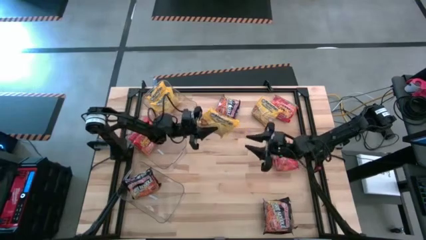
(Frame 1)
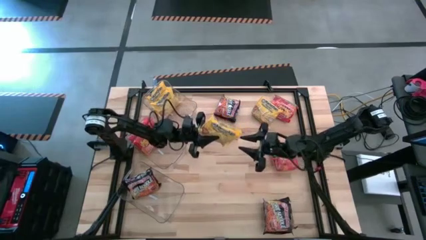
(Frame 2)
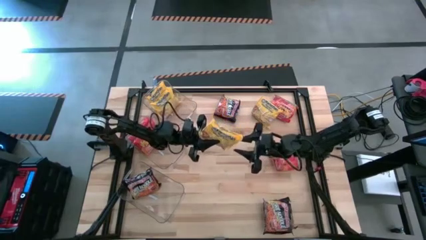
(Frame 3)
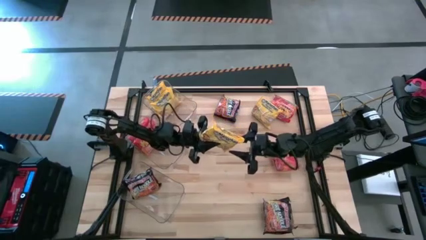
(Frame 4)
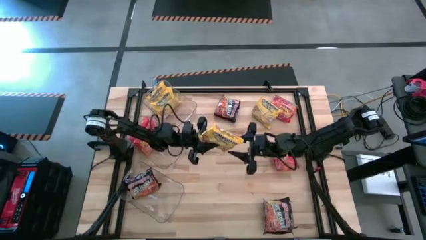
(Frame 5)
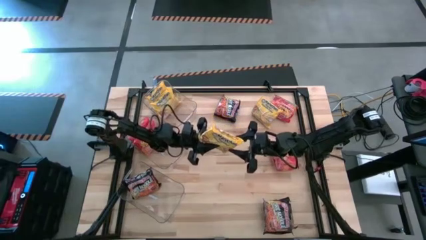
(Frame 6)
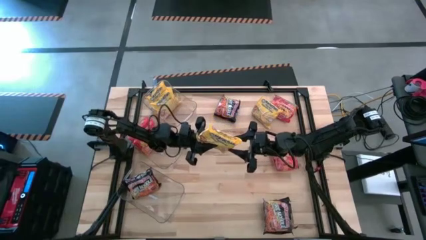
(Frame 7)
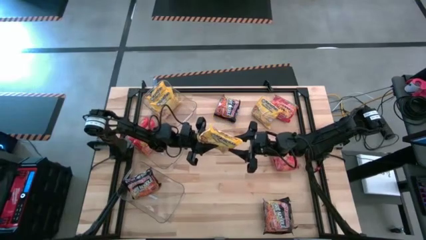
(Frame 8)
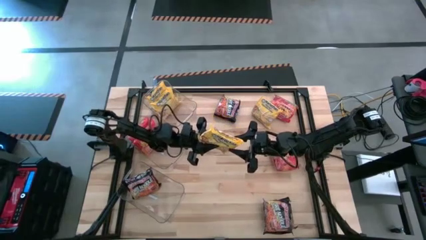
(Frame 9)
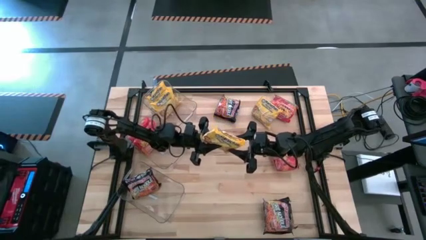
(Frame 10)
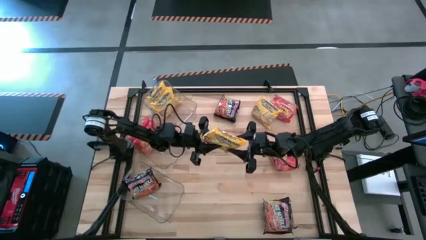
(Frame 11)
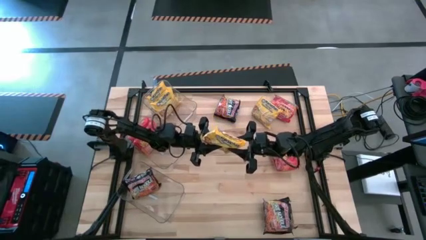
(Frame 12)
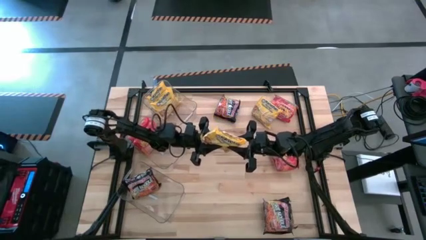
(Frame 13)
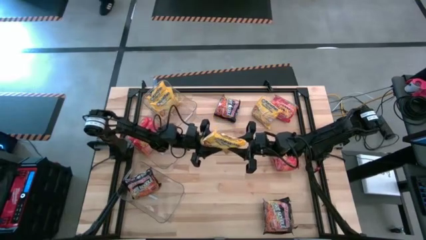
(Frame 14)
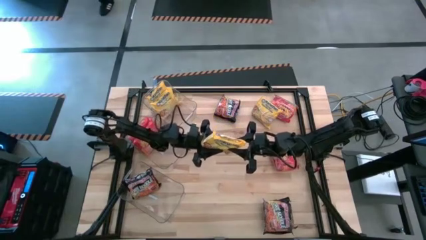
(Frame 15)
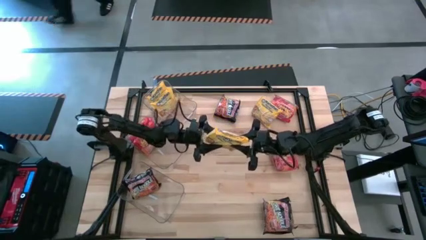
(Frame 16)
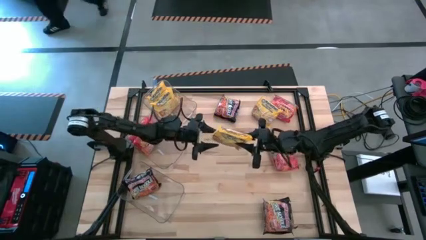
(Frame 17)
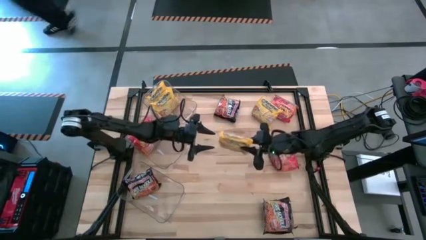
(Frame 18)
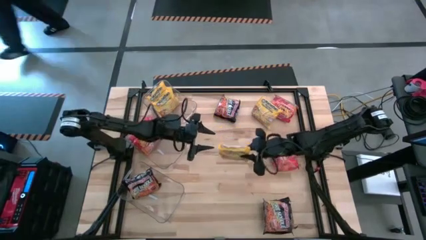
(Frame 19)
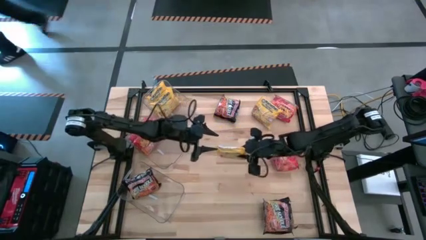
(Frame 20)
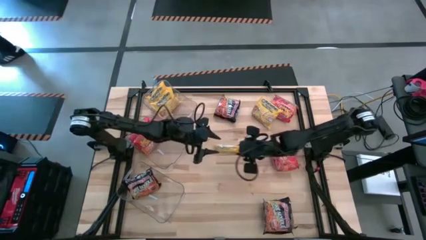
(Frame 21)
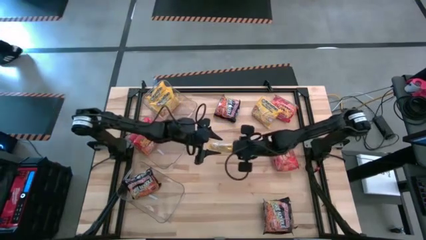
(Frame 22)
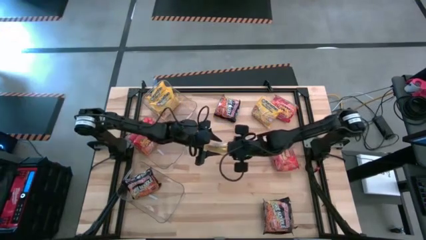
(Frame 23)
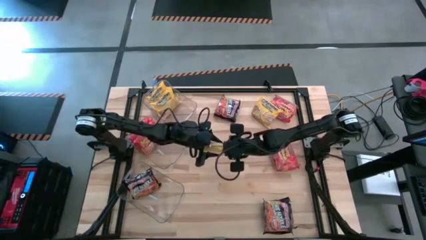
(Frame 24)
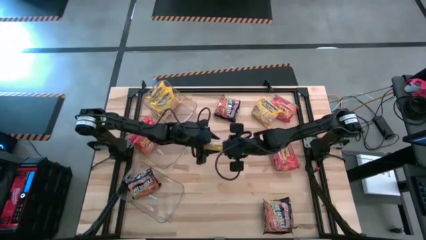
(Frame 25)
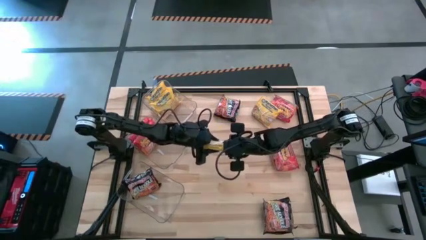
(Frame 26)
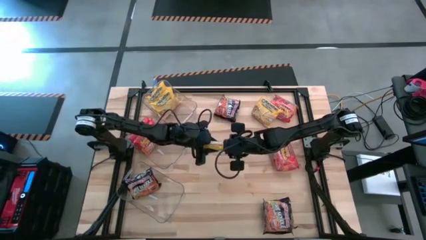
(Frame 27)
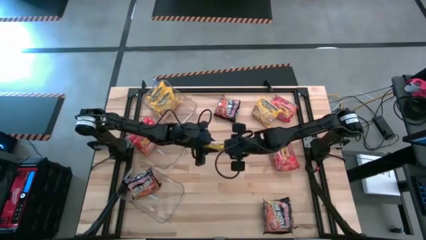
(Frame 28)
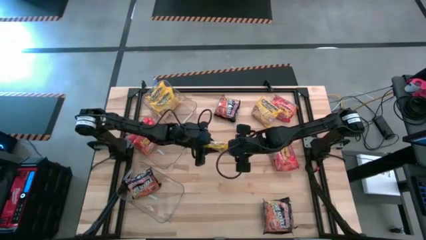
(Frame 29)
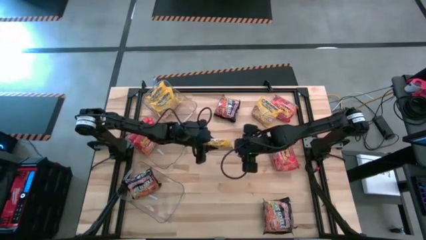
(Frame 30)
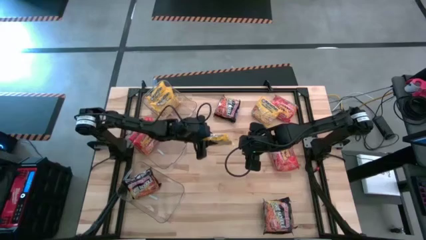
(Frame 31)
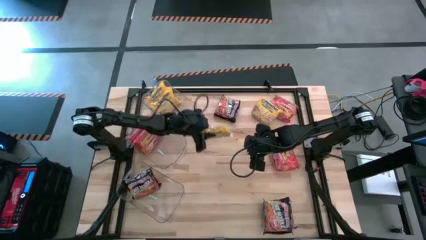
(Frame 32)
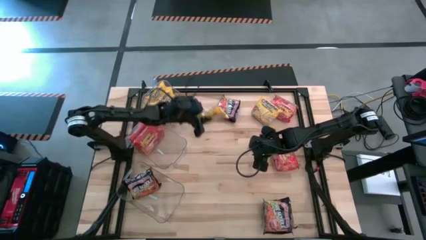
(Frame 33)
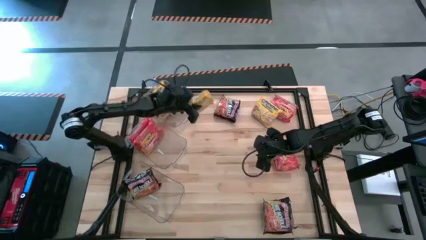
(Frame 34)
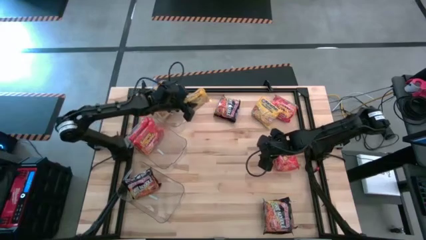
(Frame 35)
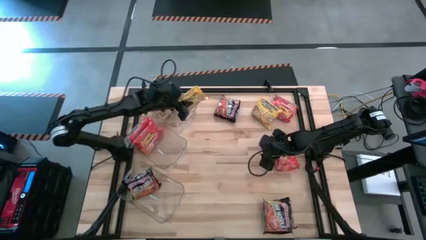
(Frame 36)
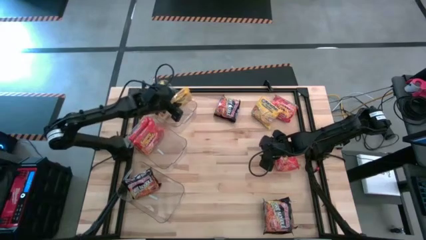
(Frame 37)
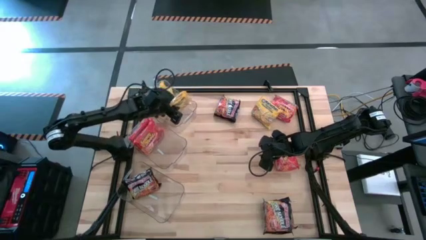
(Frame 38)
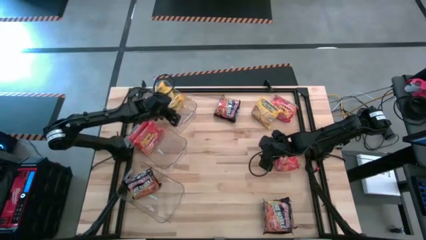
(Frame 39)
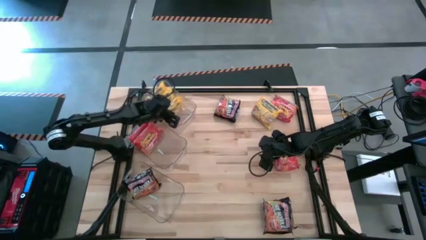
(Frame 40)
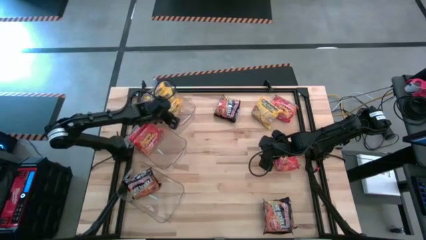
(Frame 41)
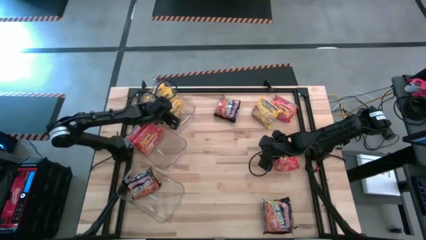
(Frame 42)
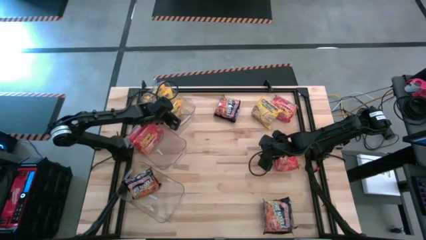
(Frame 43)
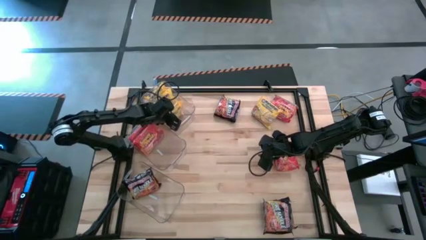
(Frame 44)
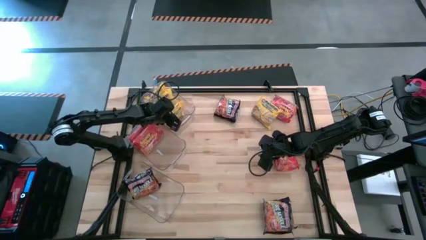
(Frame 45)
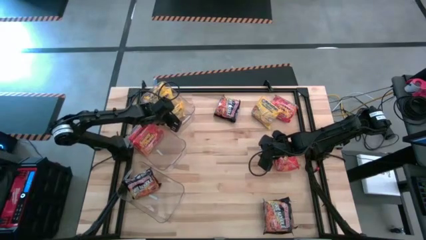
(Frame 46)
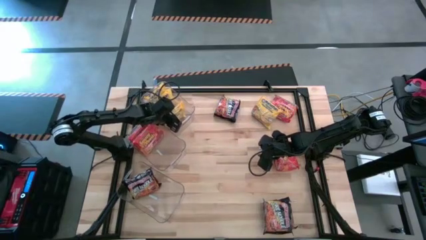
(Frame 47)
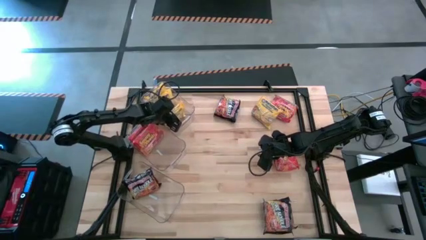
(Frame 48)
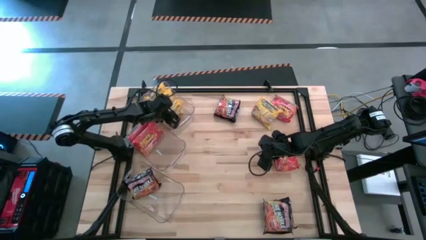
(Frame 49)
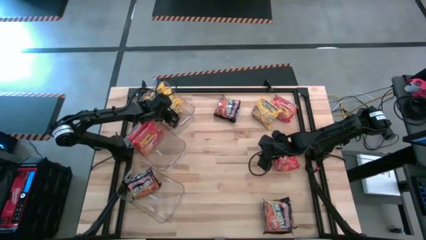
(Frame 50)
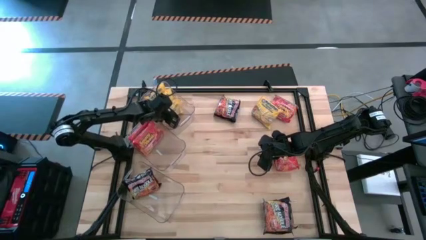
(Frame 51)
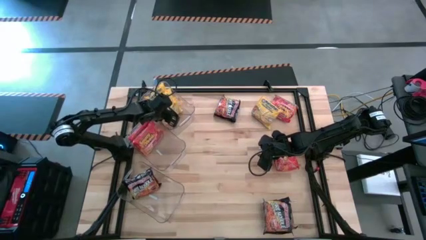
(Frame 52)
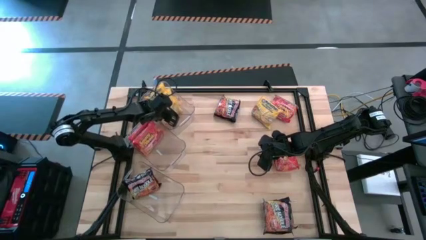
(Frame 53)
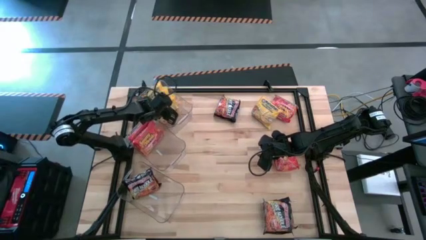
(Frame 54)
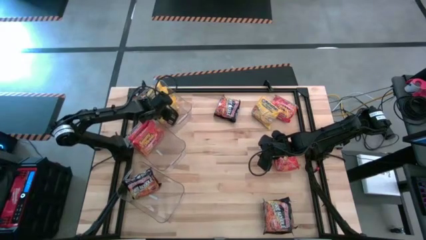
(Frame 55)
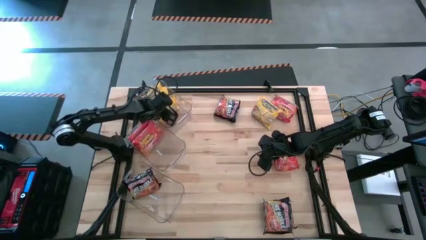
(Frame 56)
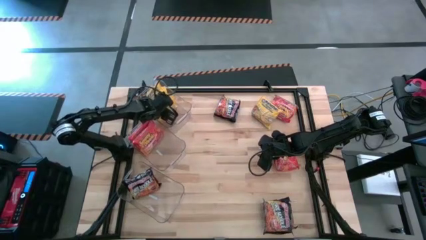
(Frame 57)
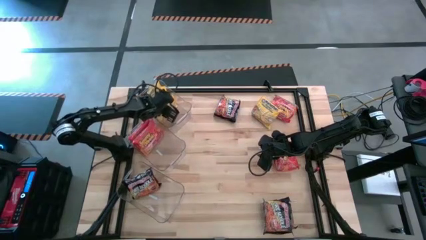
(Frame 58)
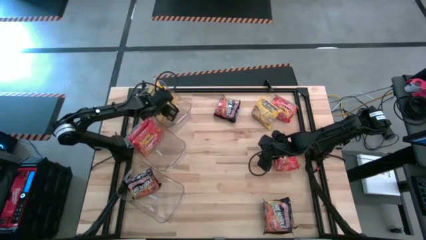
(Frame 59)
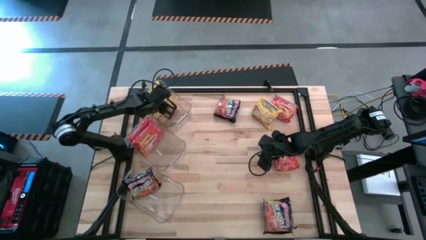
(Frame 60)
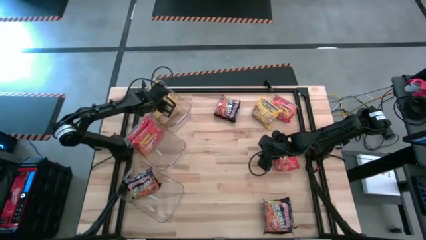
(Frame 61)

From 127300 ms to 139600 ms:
Task: Sort Maruchan noodles
Put the yellow noodles pack into the top transparent bin
